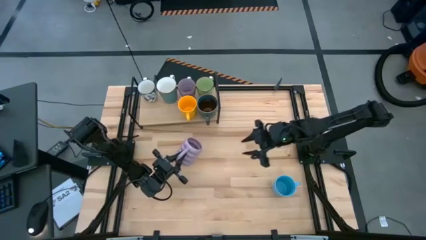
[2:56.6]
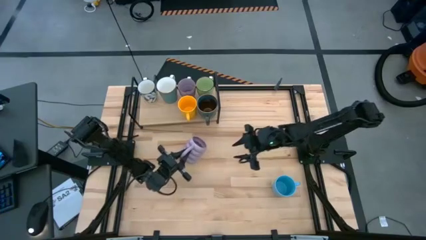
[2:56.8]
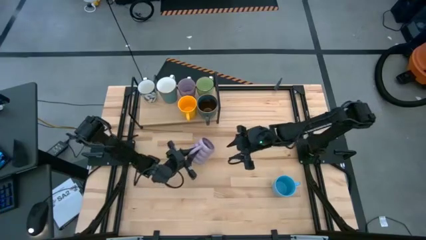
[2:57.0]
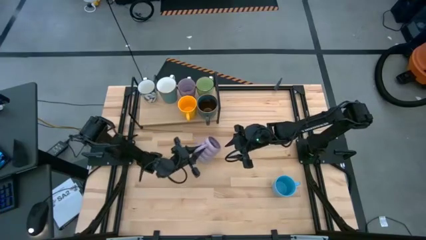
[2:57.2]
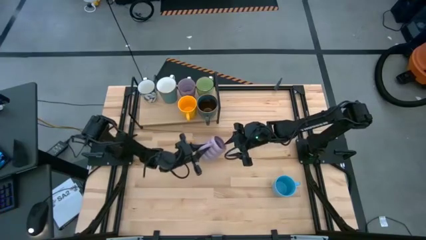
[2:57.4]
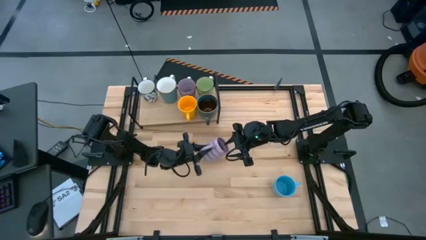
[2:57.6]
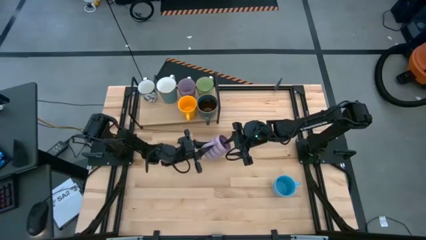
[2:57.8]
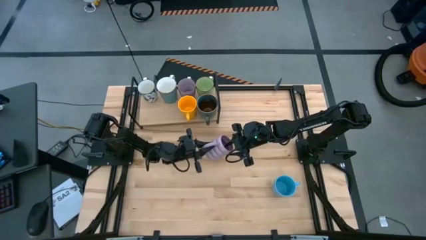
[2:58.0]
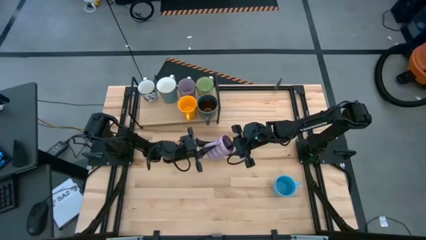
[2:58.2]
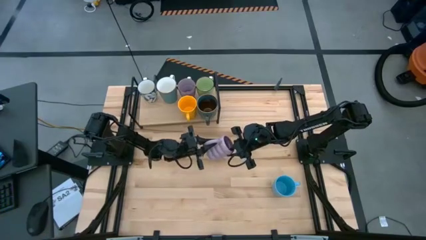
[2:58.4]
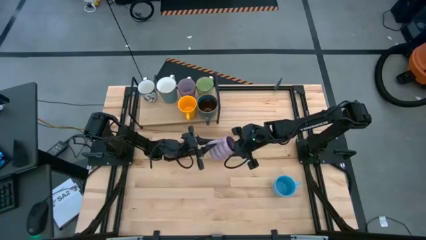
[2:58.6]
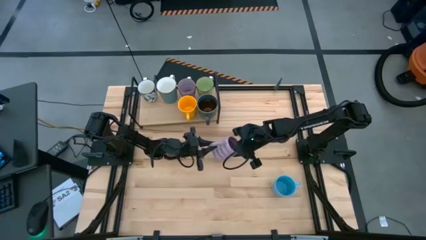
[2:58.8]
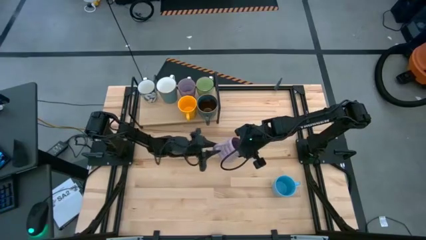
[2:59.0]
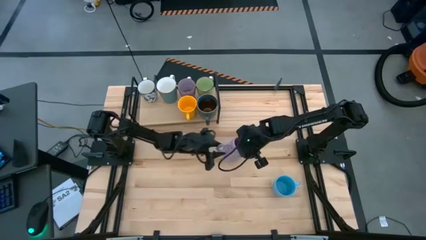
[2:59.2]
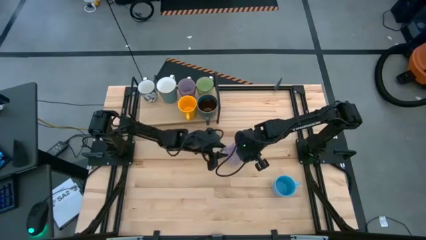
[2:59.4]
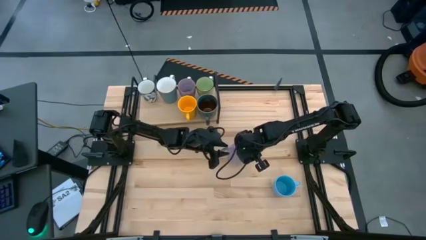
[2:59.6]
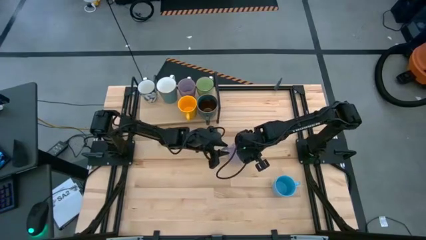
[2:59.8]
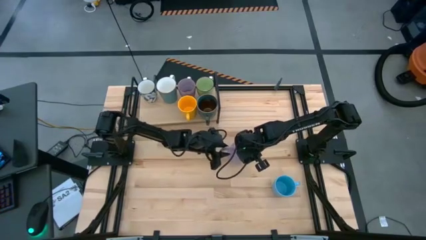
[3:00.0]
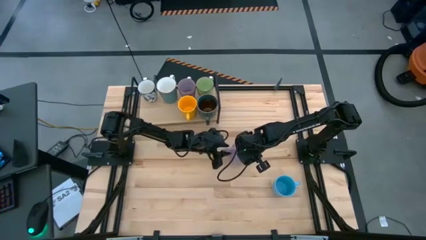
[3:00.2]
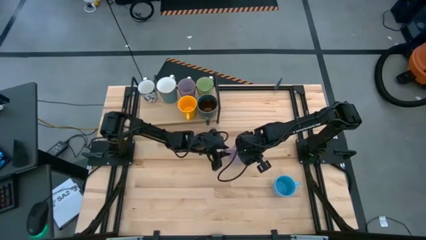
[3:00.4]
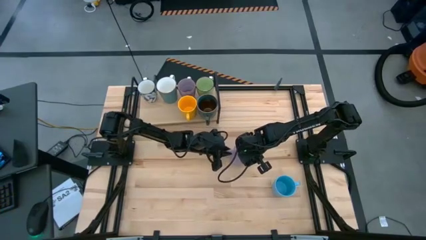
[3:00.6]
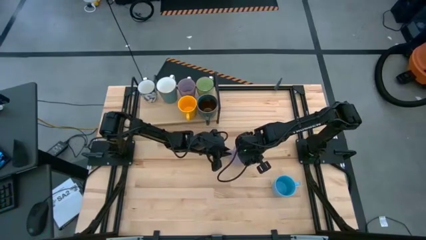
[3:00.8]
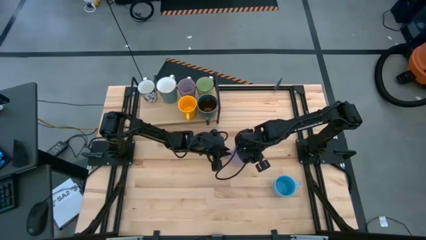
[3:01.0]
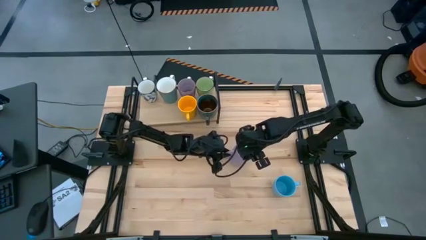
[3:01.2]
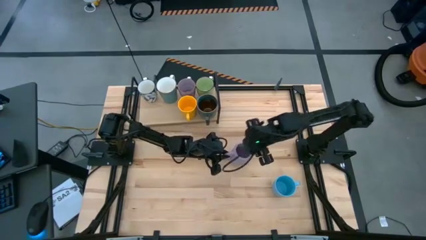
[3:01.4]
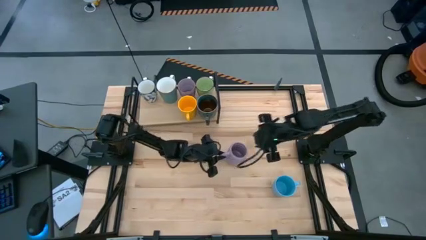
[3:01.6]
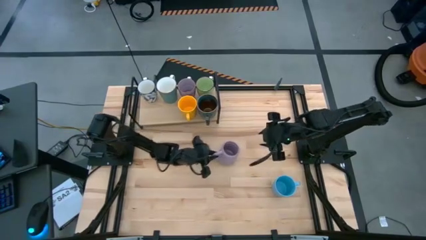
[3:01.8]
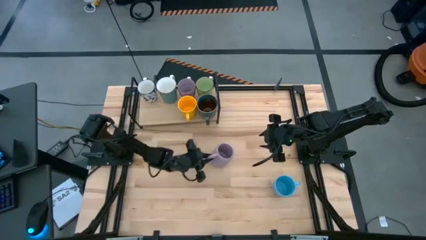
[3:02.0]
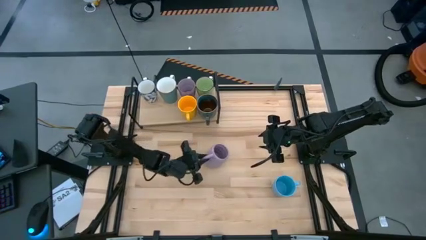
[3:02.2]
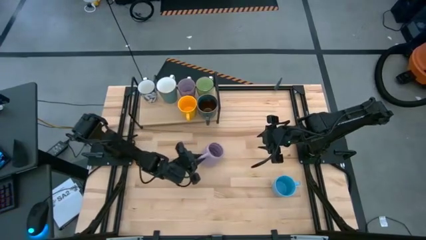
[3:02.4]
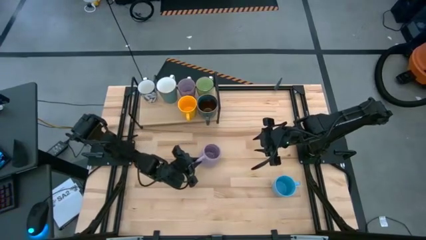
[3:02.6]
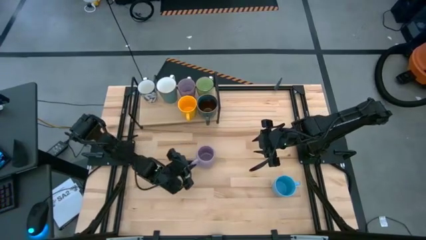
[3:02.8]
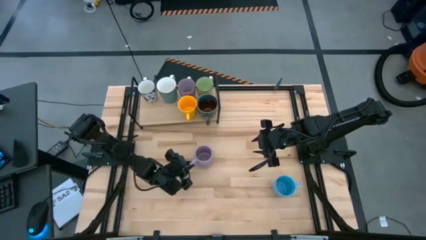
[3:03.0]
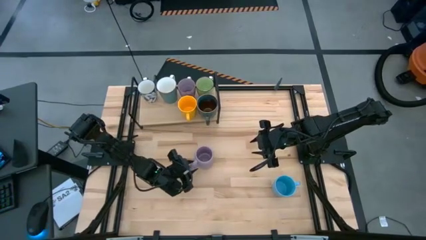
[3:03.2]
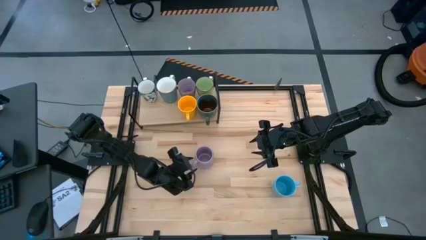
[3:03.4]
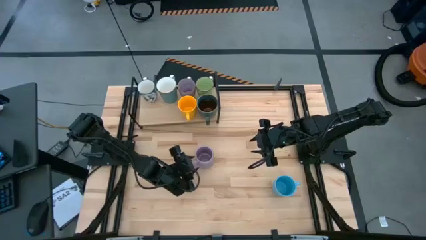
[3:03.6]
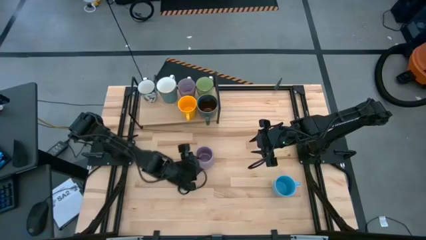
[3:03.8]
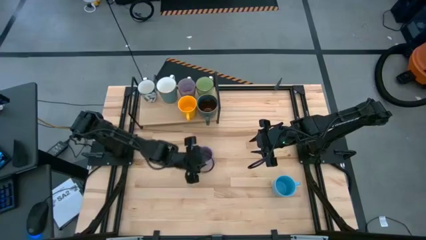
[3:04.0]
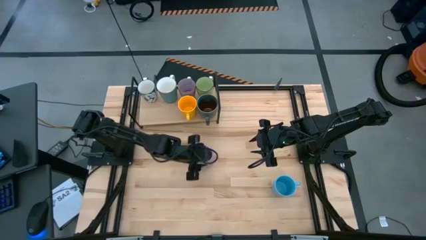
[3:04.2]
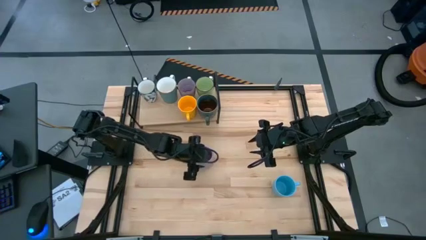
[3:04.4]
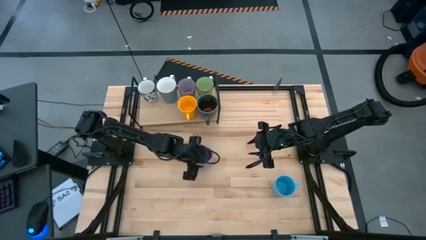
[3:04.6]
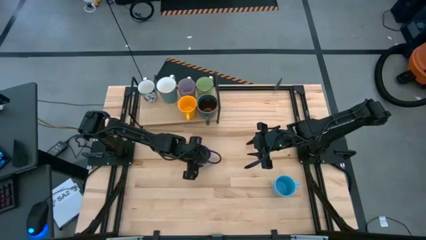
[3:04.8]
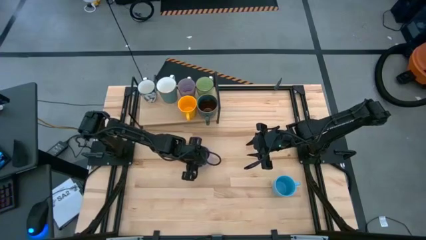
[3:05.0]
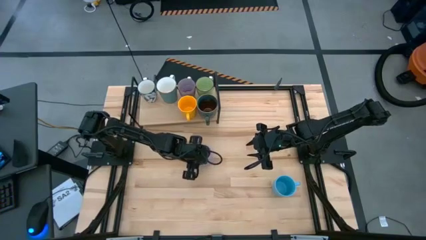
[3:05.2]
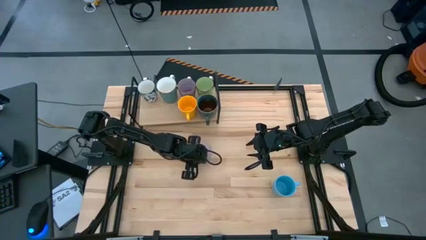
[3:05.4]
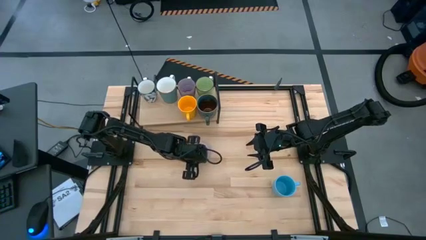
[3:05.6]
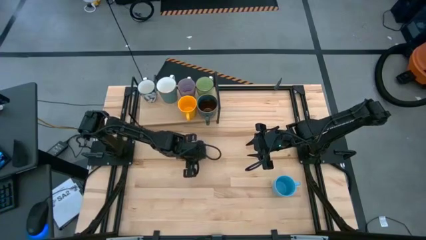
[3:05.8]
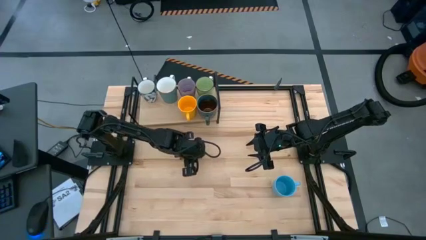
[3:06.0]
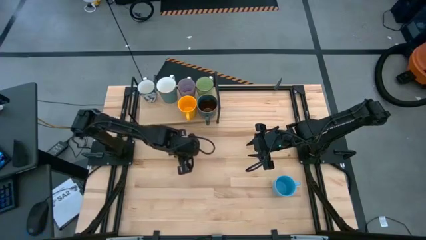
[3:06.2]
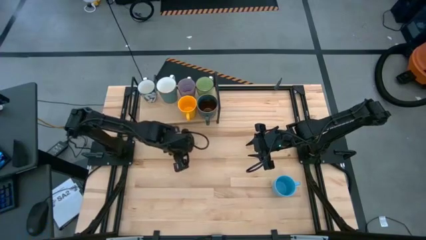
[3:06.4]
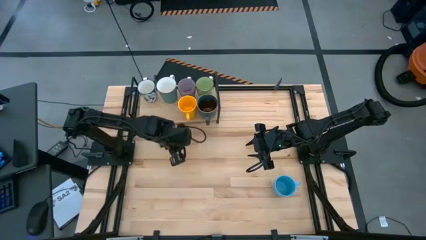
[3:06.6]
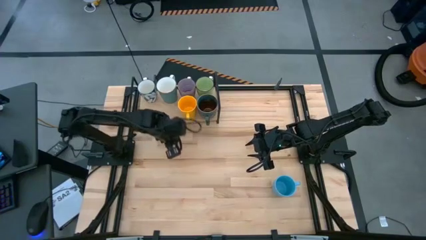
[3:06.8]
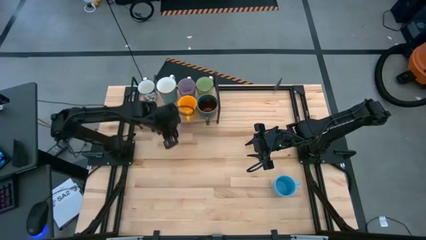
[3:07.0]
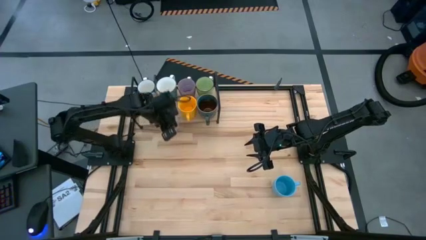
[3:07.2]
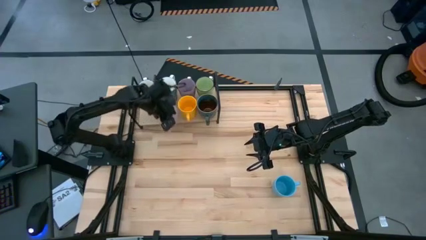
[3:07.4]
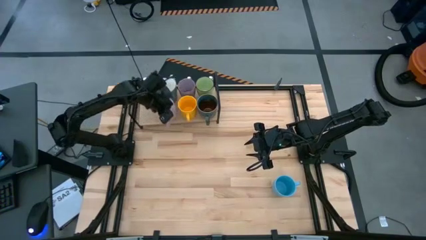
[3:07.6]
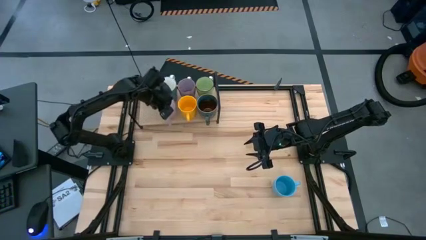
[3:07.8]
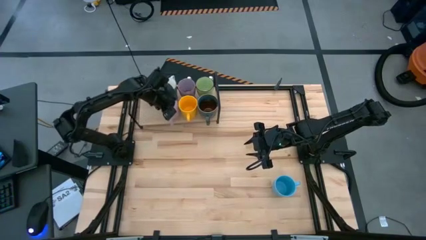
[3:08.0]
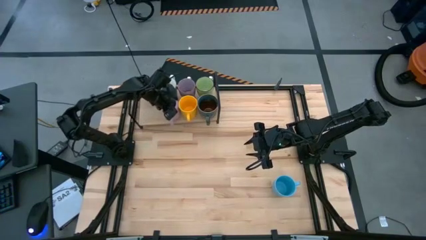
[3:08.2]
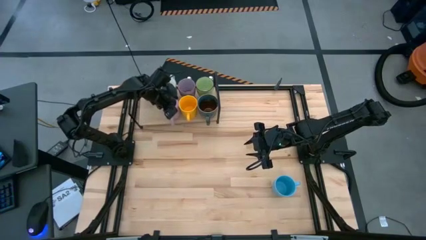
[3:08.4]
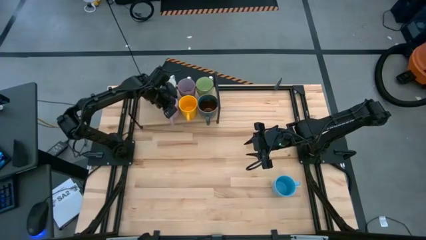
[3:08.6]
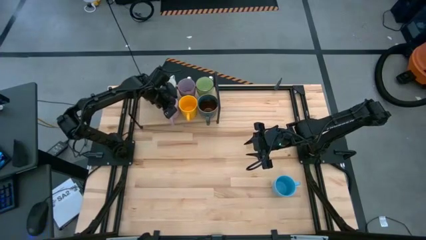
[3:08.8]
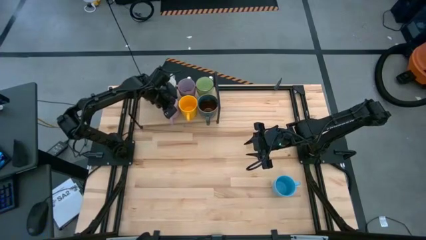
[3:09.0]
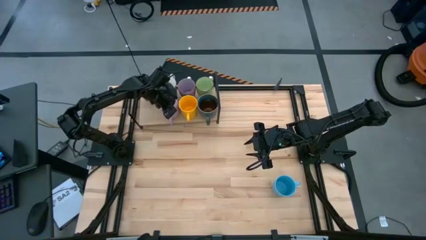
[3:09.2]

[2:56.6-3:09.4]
Task: Place coffee mugs
Put the purple mug on the shelf

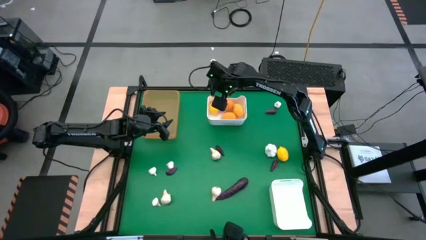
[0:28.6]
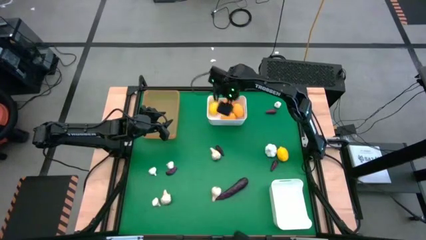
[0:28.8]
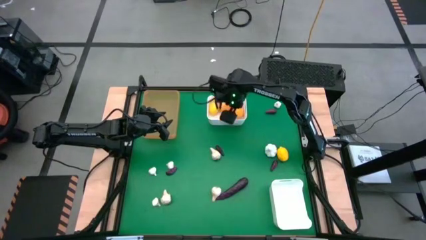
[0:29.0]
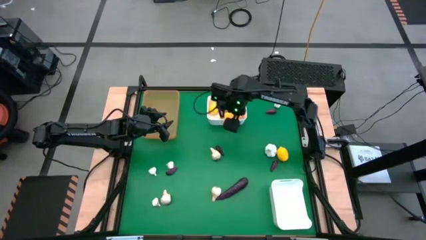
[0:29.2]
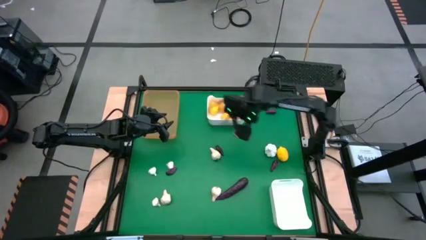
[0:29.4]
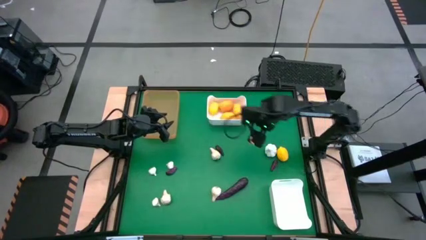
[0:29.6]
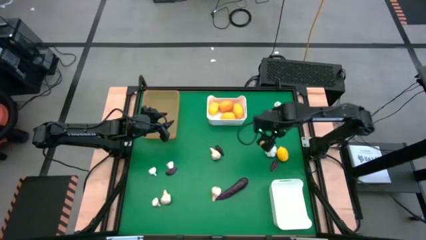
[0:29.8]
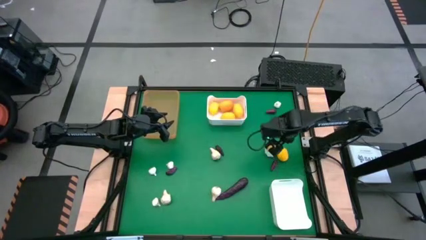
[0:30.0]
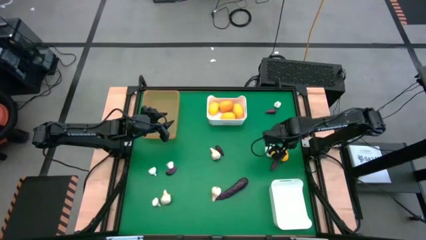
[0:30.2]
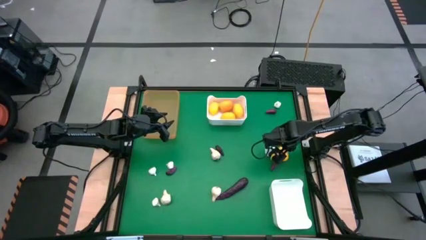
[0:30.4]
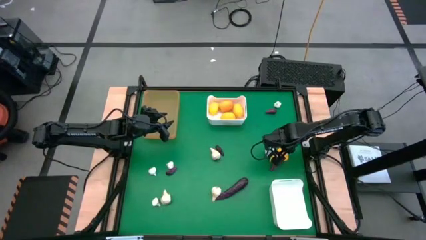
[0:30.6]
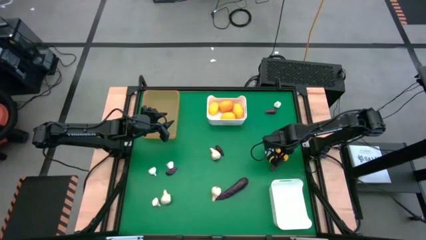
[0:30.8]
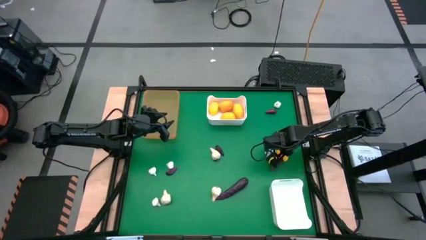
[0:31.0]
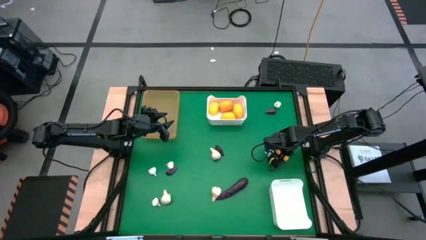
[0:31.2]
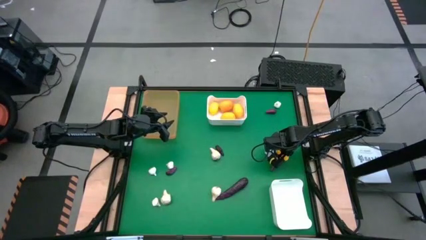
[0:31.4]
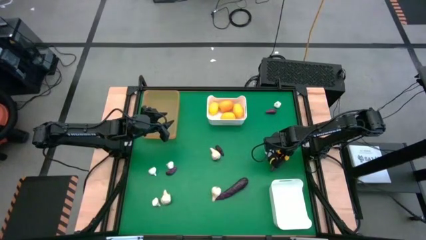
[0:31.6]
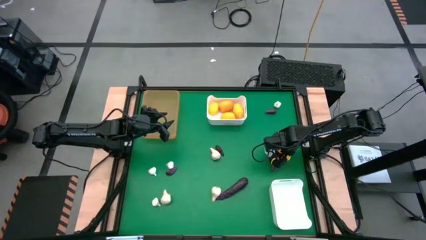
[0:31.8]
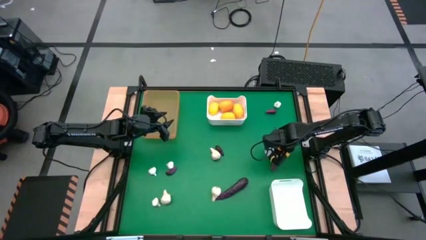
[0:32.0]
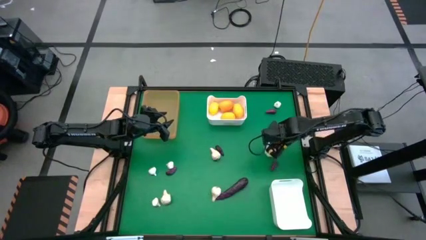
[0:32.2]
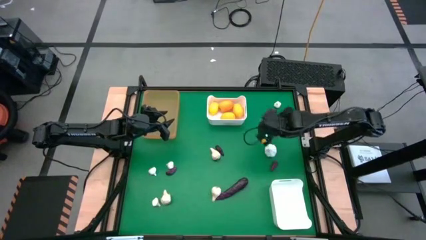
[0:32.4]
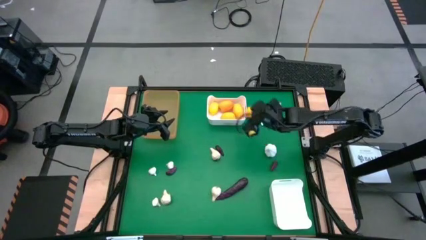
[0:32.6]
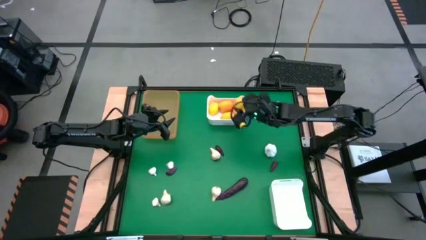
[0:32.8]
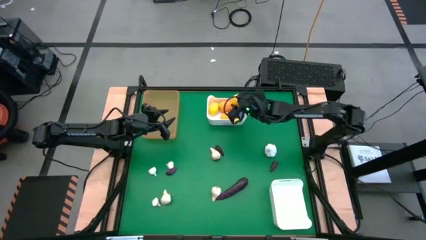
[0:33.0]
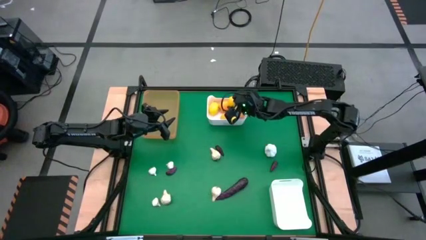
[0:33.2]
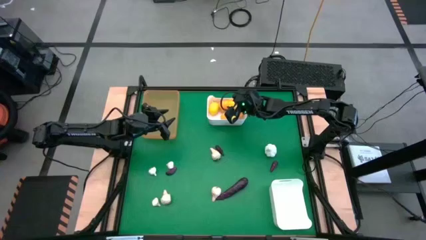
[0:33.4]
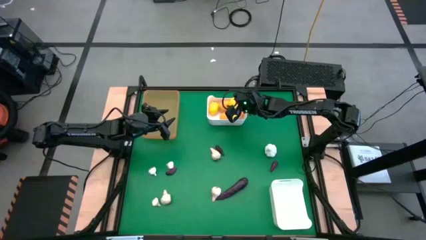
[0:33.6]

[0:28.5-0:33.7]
Task: Sort produce into baskets
Put the lemon into the top white bin
